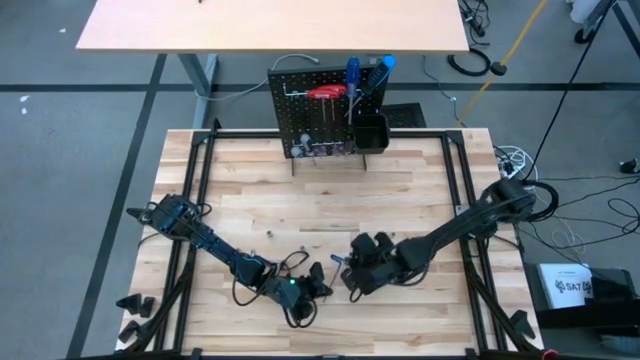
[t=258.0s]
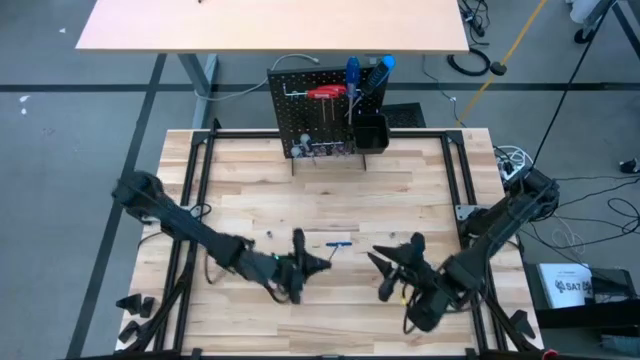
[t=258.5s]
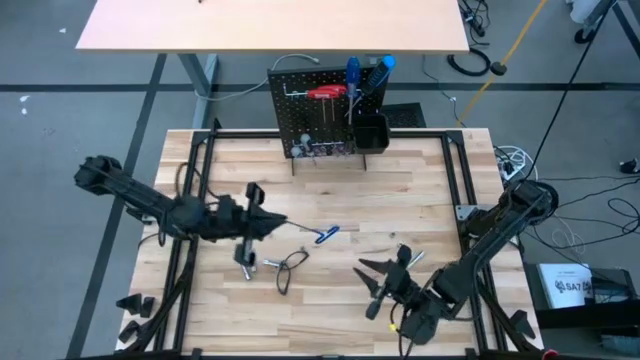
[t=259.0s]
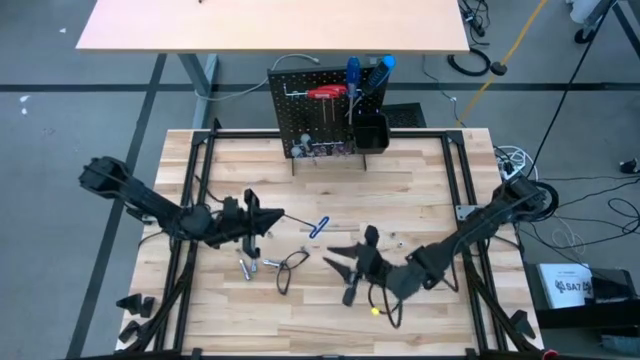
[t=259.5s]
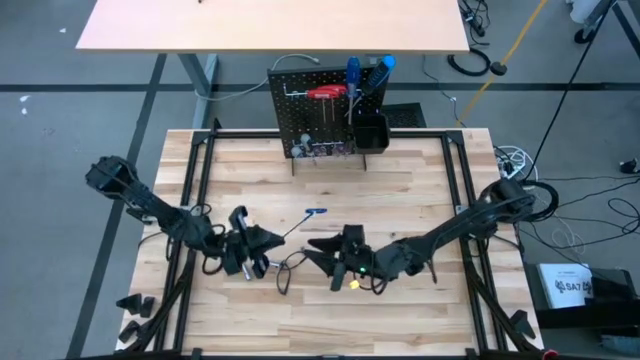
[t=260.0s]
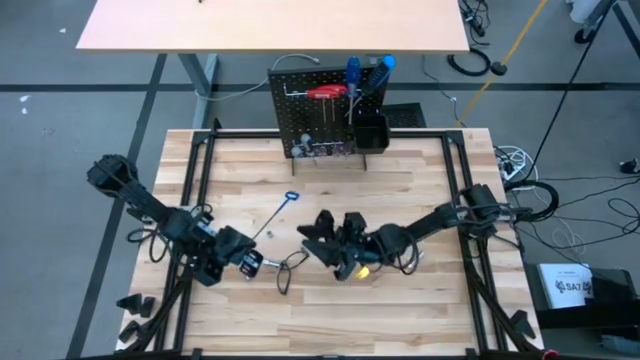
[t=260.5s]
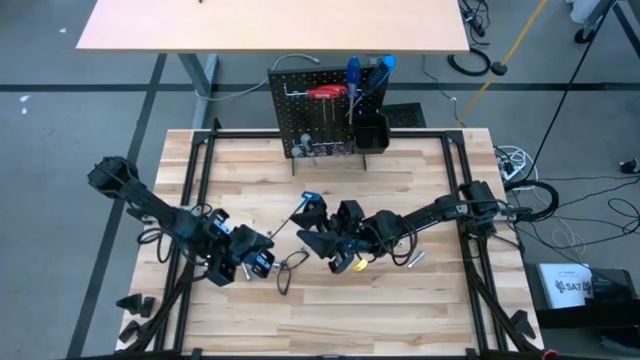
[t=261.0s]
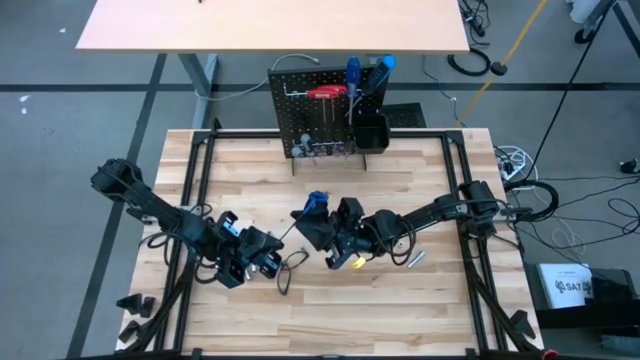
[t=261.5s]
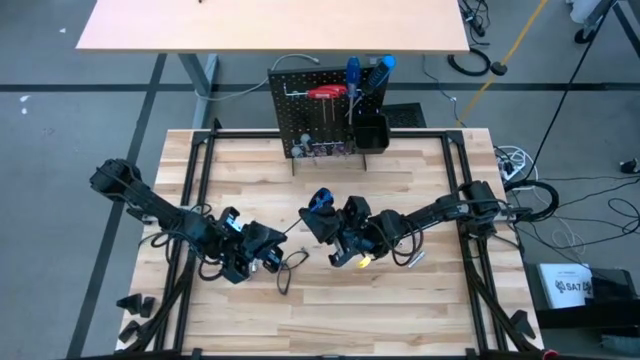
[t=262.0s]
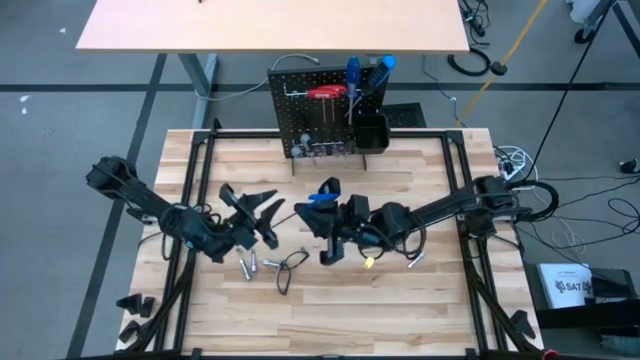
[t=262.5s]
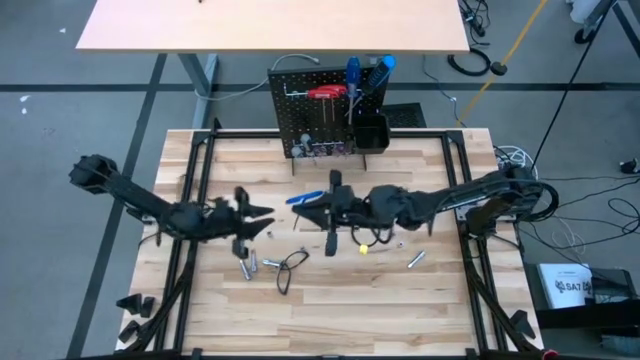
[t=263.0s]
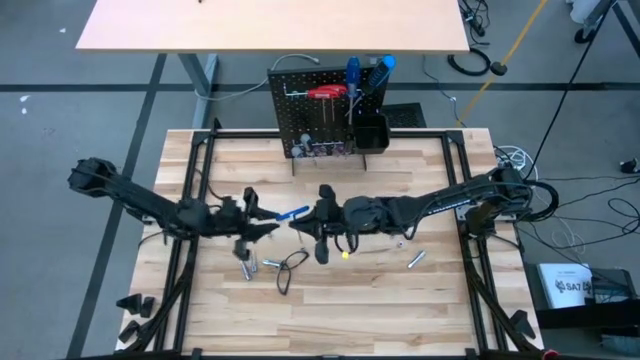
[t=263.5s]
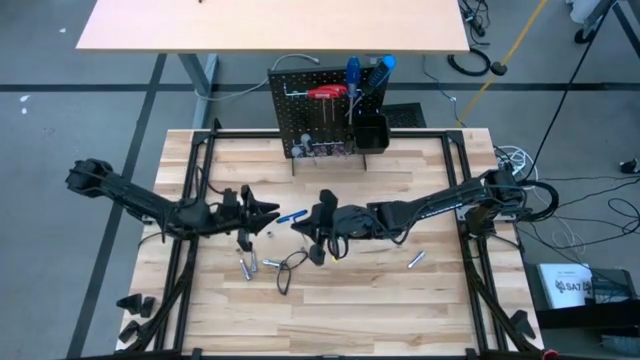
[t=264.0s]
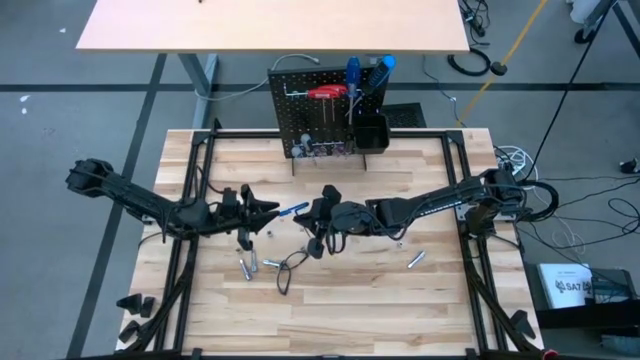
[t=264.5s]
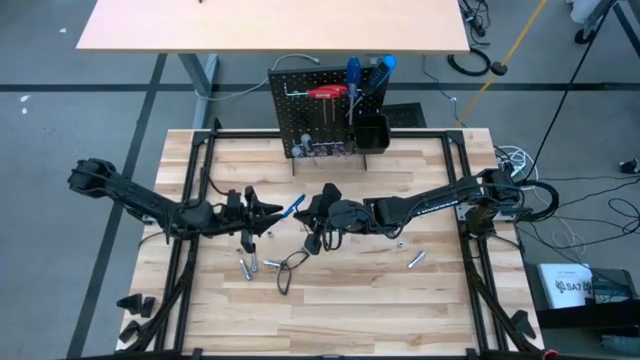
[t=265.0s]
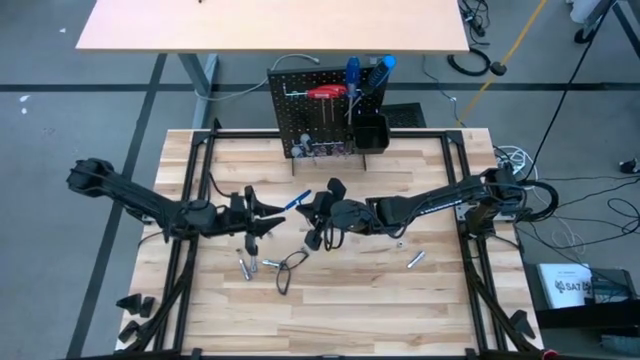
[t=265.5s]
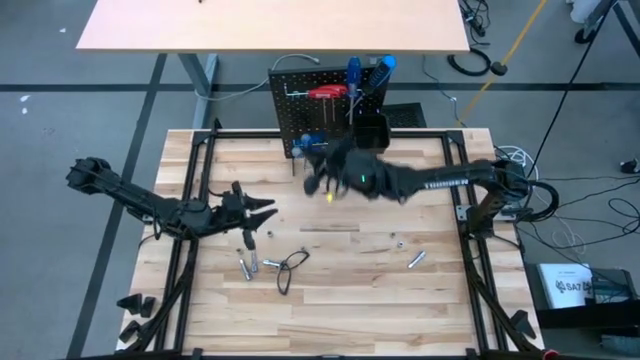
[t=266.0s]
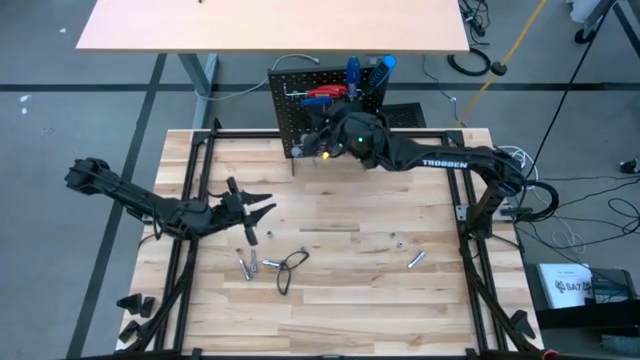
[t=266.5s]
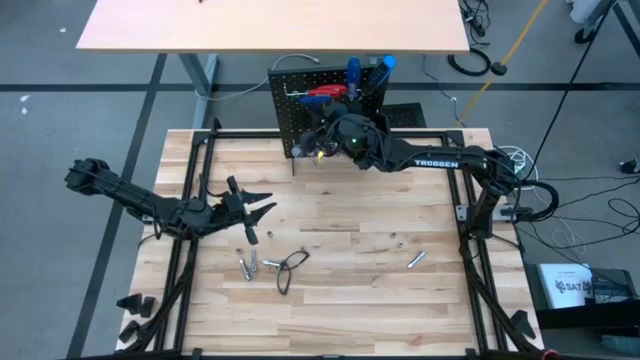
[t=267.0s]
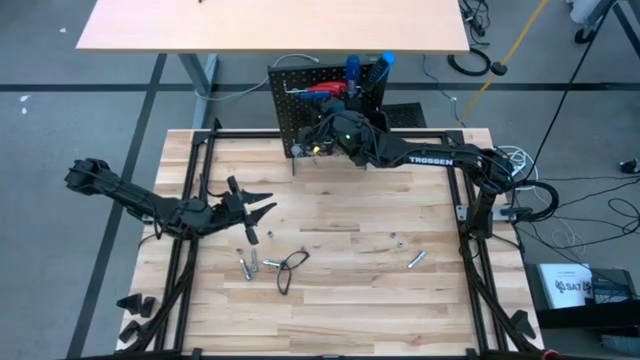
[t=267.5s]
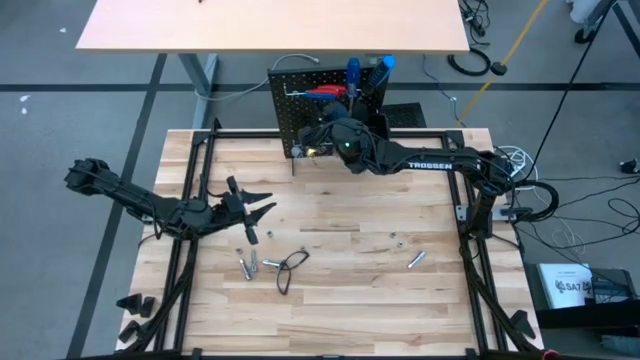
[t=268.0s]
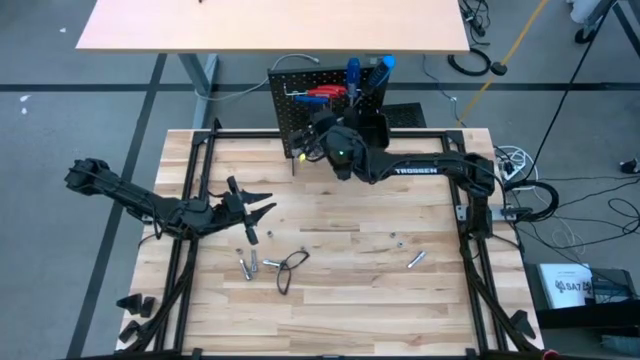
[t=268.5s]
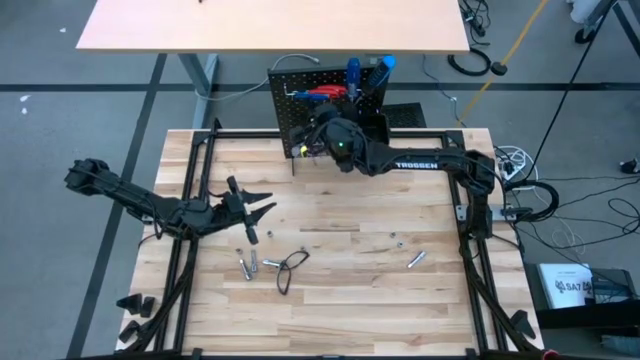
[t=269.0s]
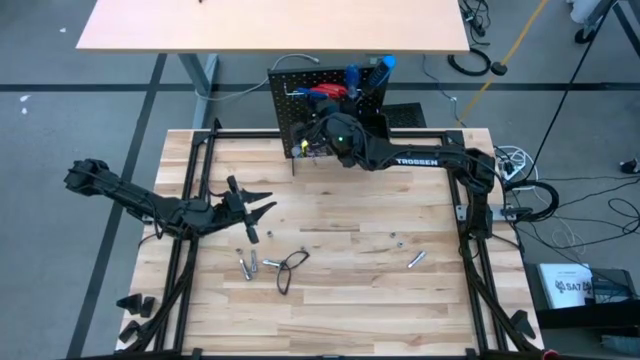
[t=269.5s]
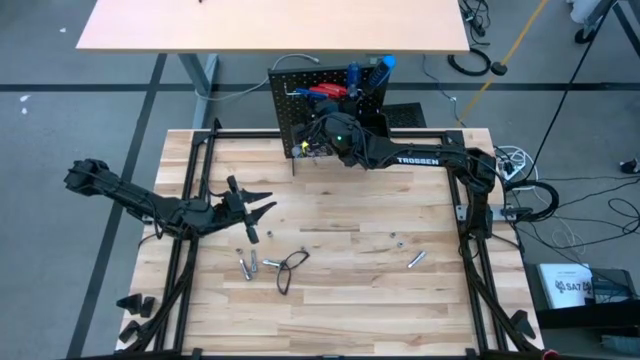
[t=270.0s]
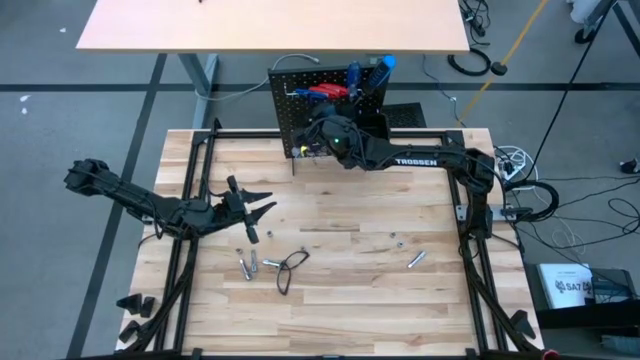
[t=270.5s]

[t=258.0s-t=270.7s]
Task: Hang tools onto peg board
Hang the pick tool on the peg board

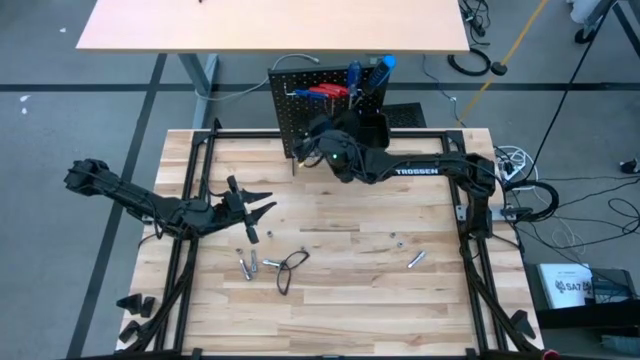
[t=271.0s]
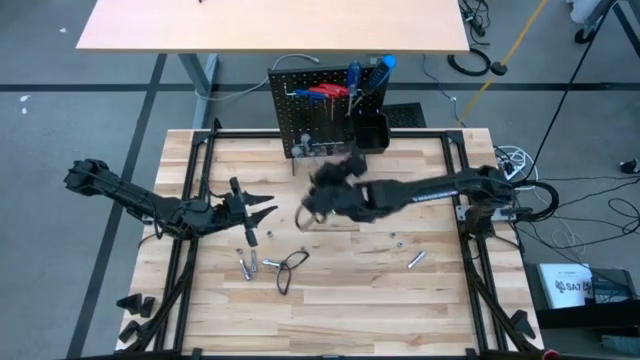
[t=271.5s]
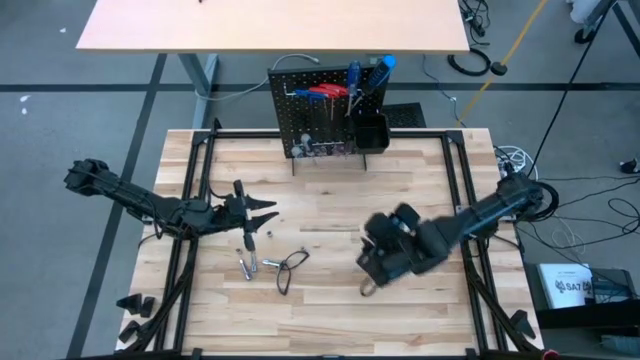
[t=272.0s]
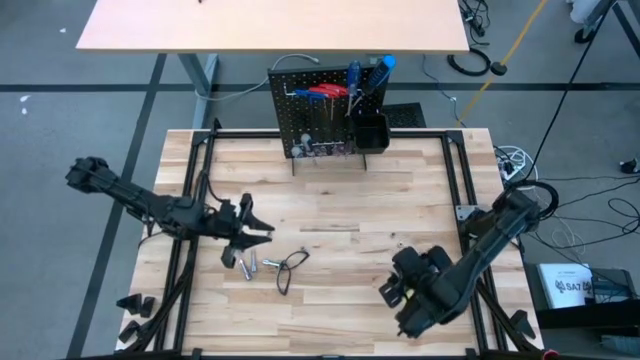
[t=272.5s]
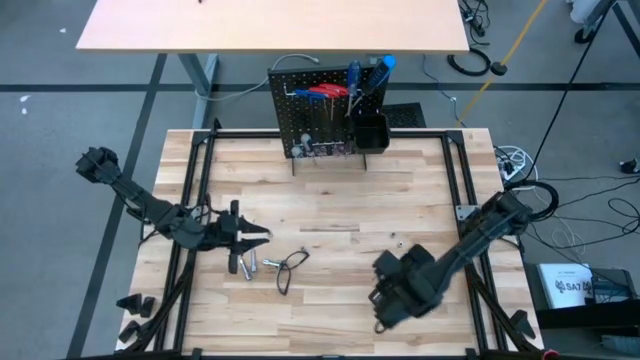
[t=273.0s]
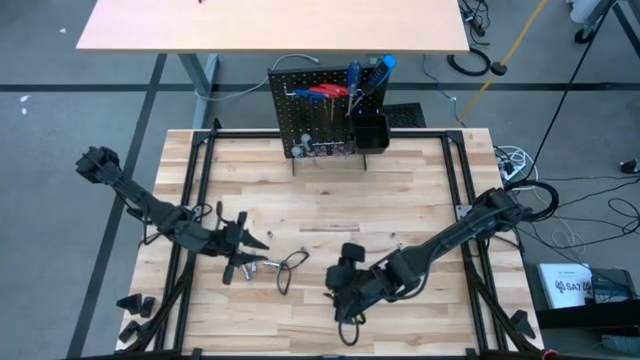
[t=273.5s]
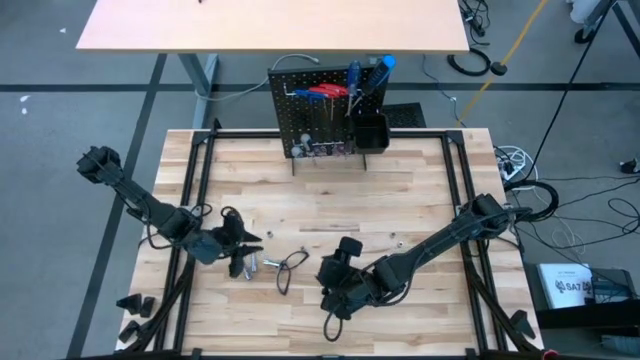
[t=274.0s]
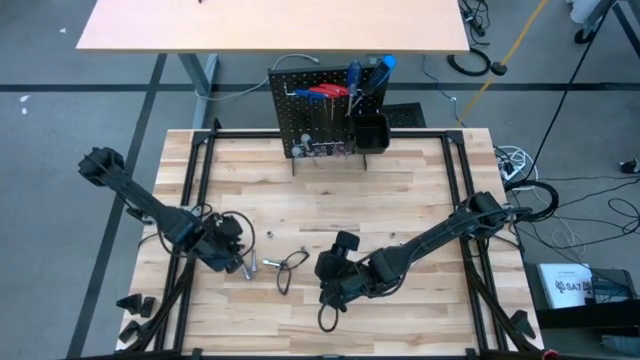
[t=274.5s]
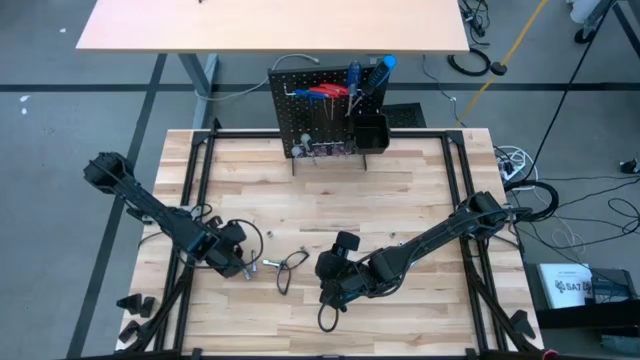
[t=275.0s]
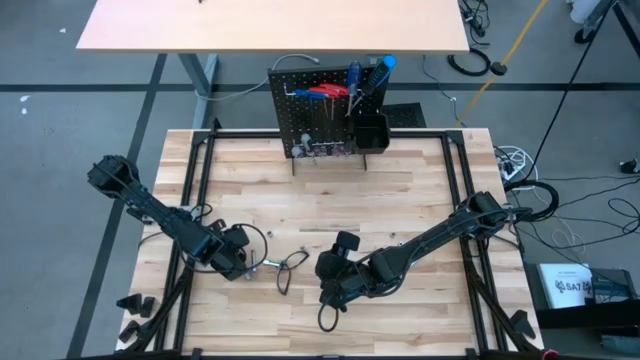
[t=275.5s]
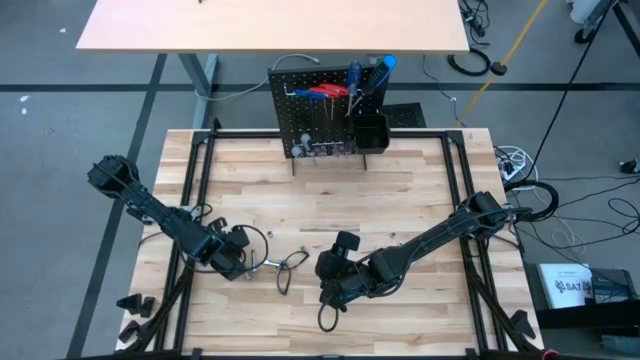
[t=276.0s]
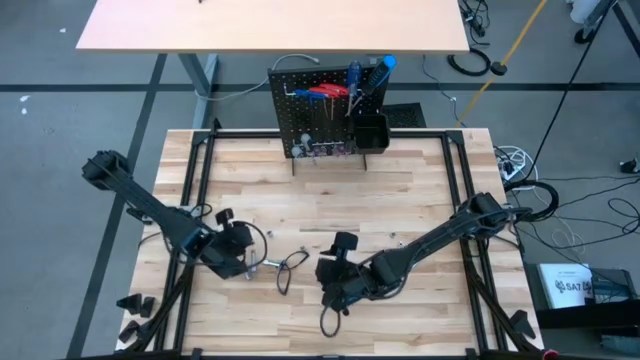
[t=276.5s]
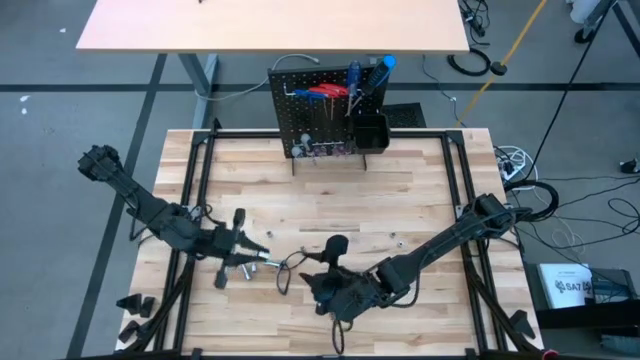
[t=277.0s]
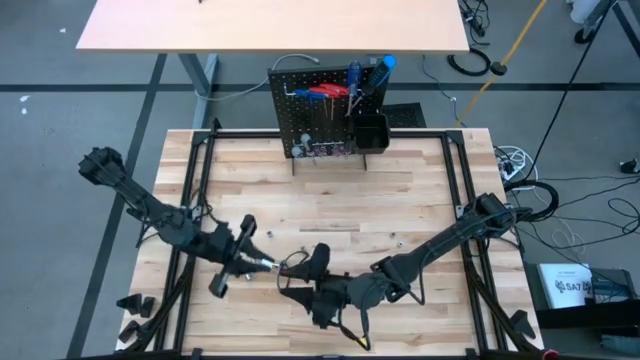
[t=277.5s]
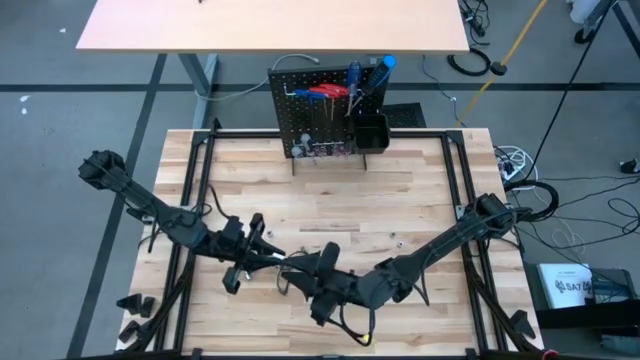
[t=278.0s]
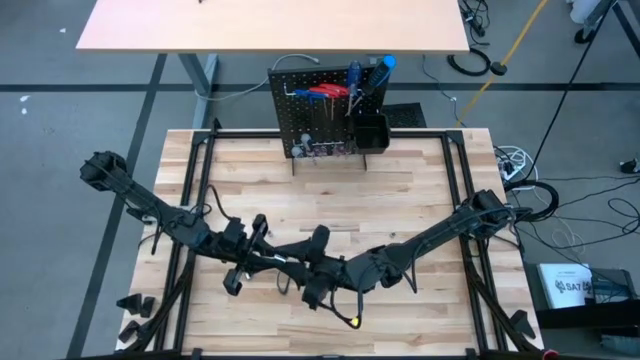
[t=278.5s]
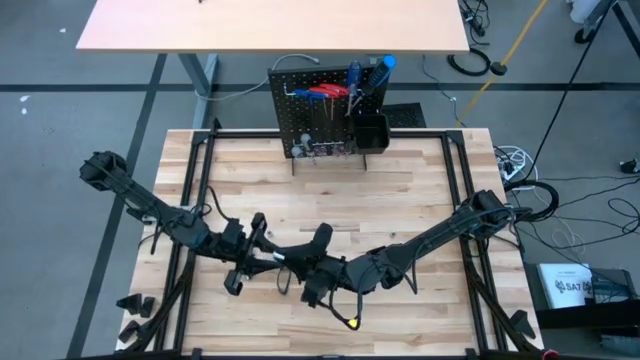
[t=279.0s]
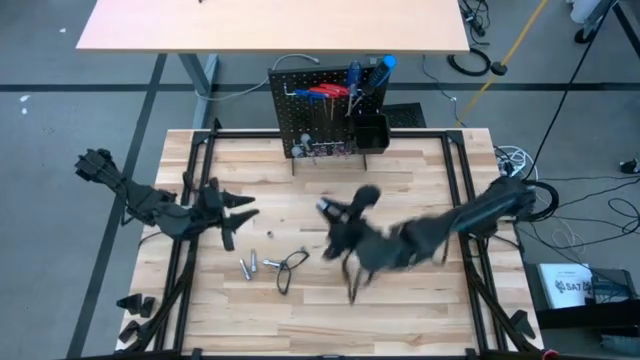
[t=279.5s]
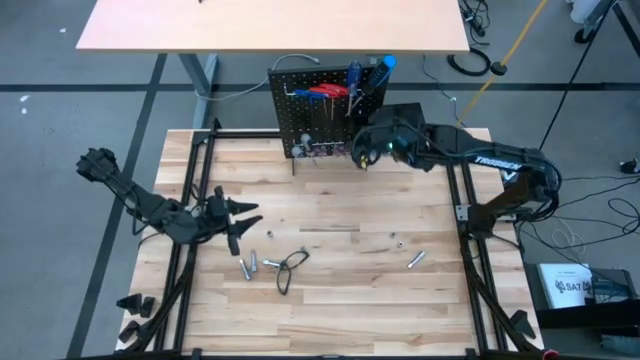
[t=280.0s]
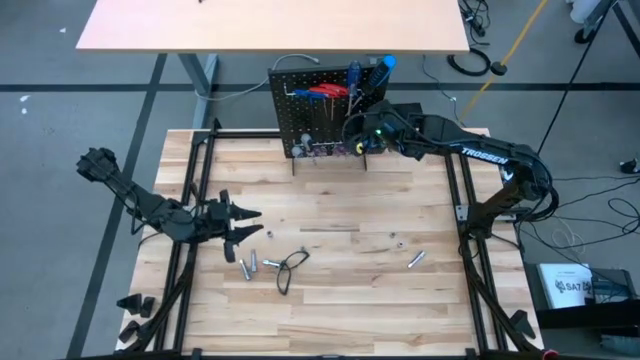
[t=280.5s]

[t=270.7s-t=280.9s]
Put the socket into the black bin on the peg board
